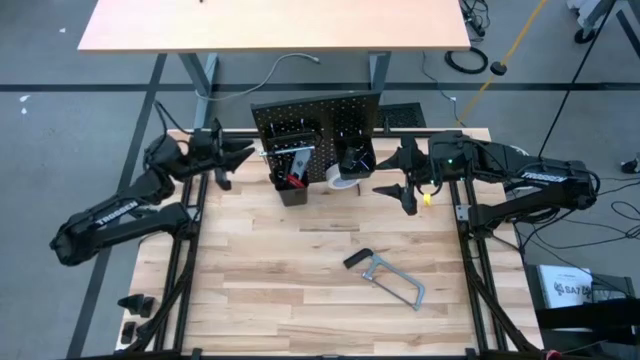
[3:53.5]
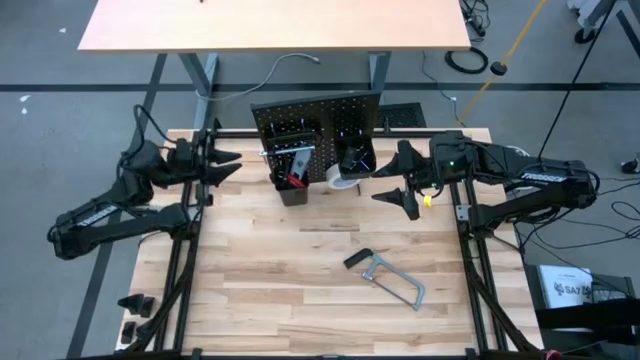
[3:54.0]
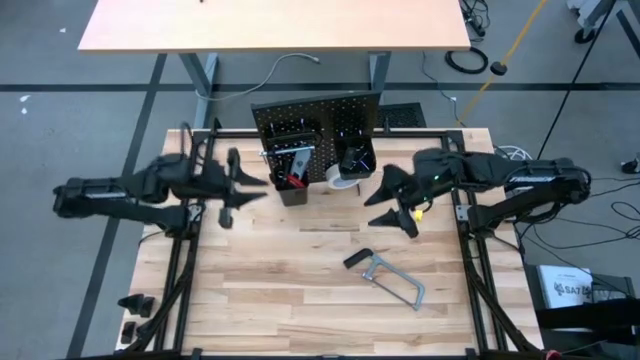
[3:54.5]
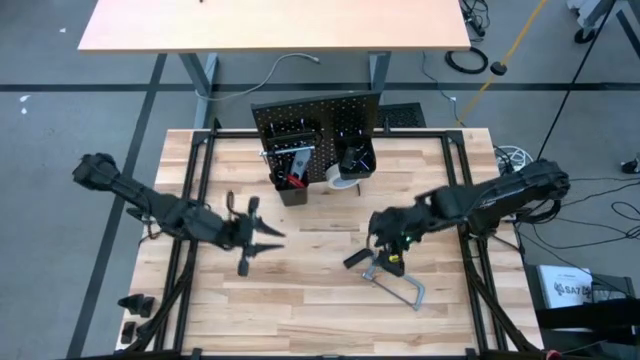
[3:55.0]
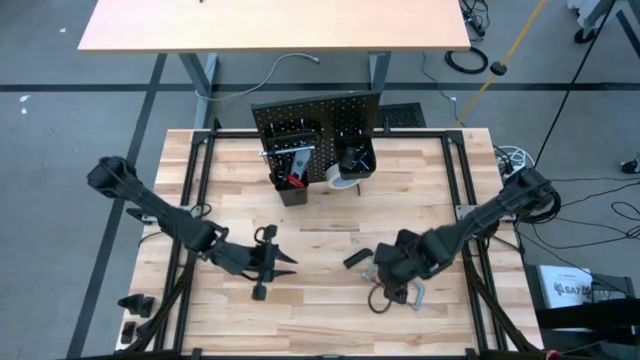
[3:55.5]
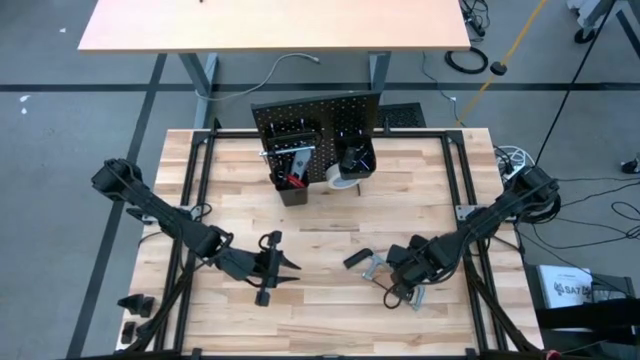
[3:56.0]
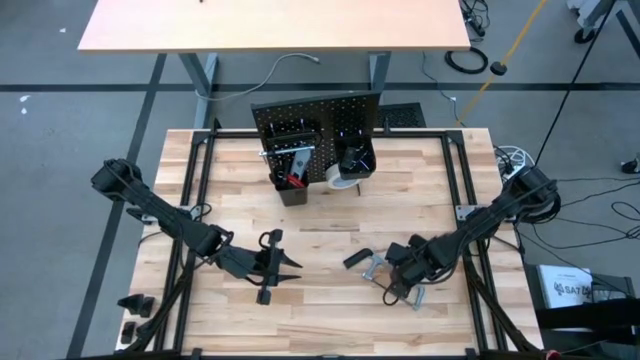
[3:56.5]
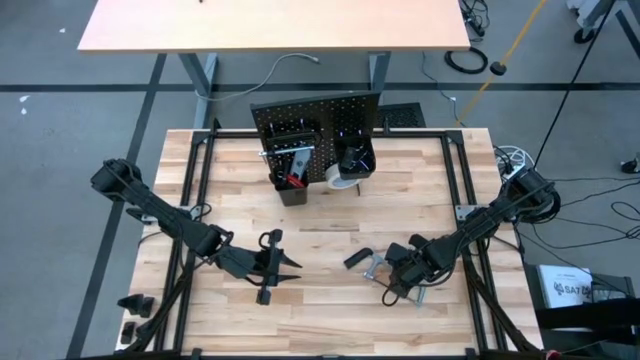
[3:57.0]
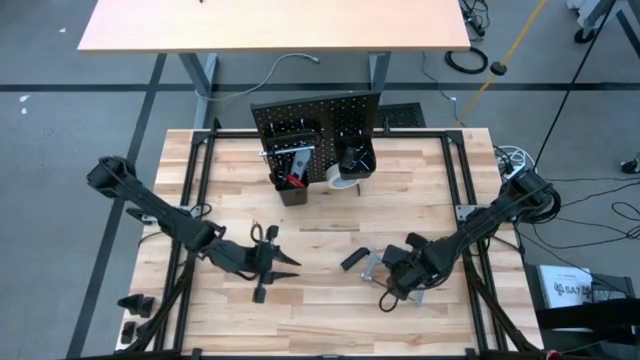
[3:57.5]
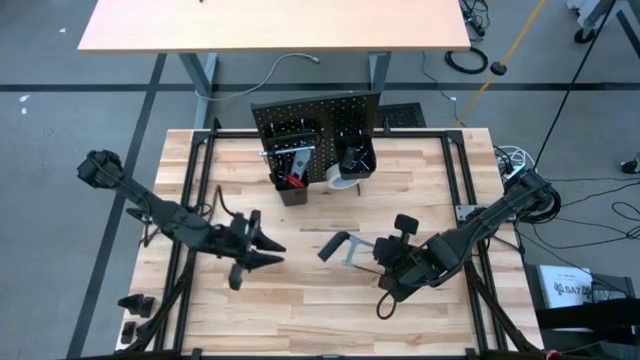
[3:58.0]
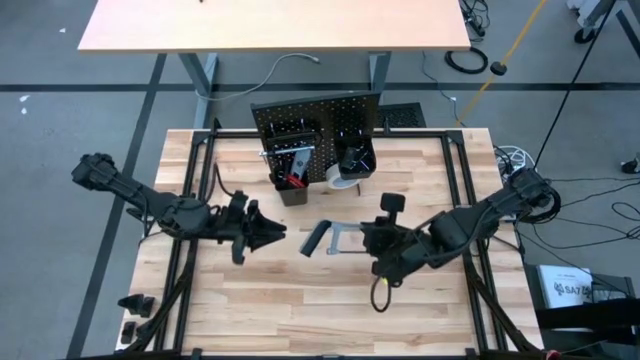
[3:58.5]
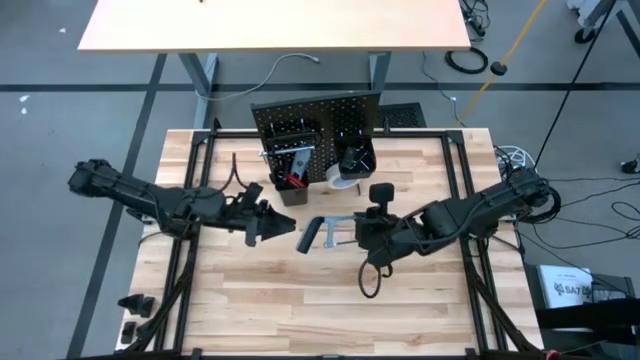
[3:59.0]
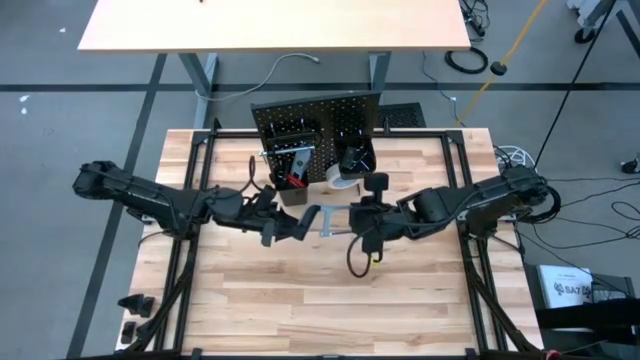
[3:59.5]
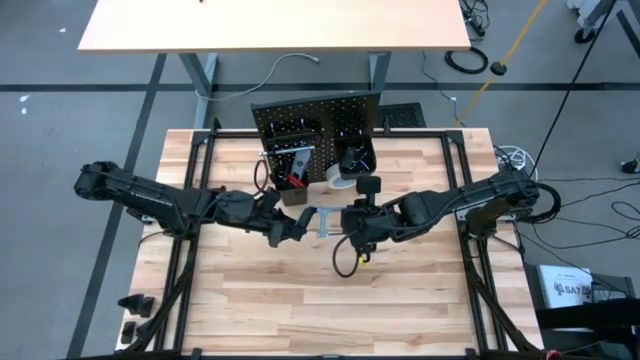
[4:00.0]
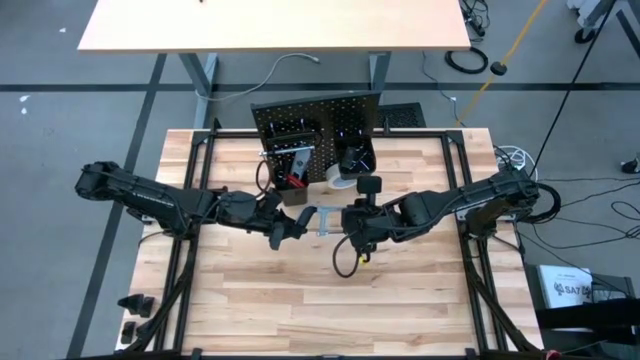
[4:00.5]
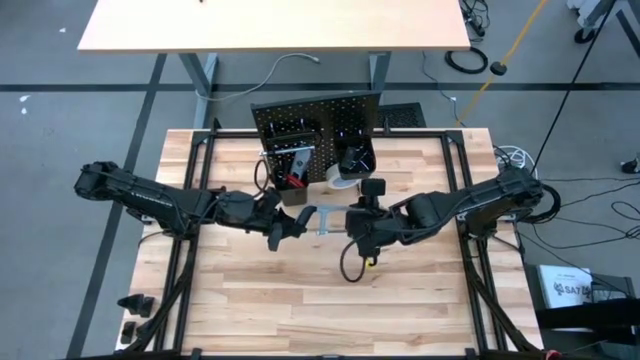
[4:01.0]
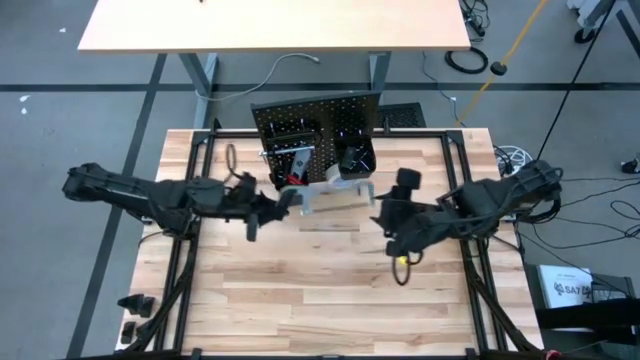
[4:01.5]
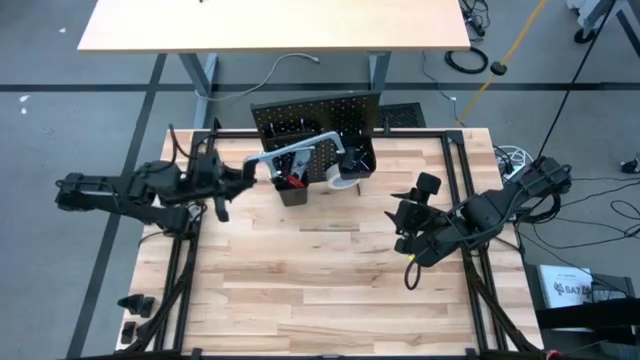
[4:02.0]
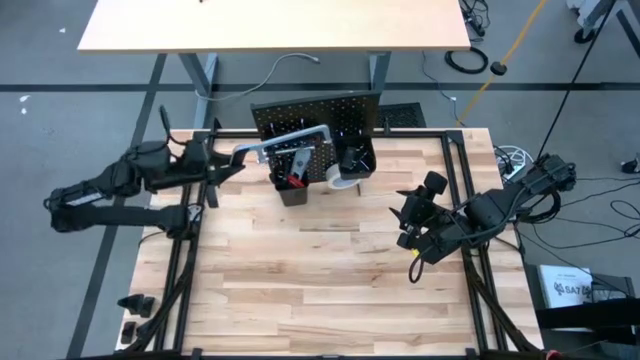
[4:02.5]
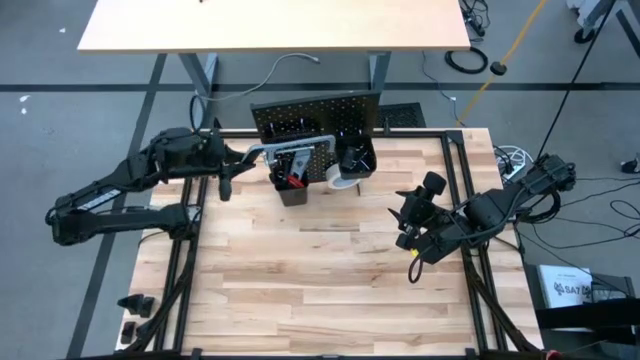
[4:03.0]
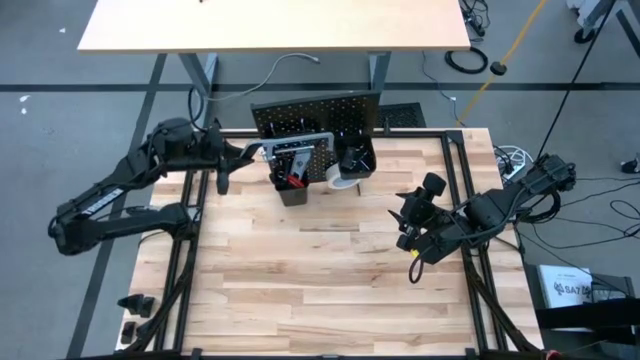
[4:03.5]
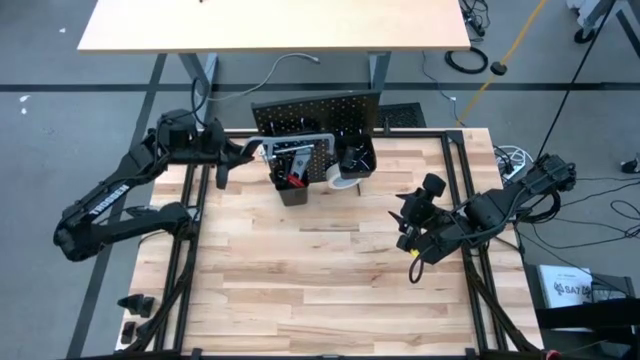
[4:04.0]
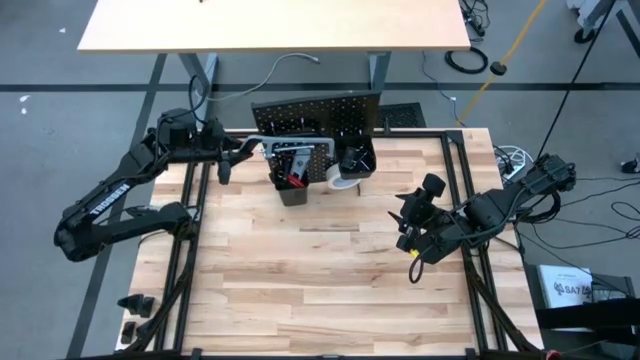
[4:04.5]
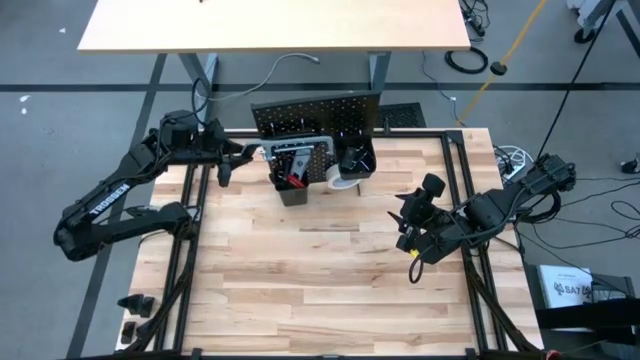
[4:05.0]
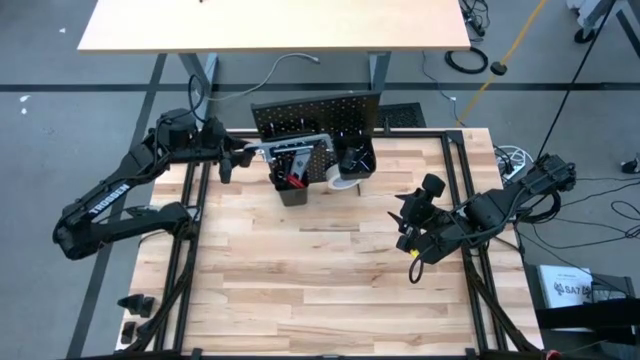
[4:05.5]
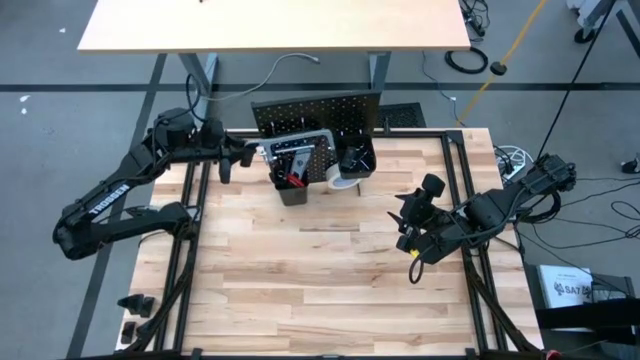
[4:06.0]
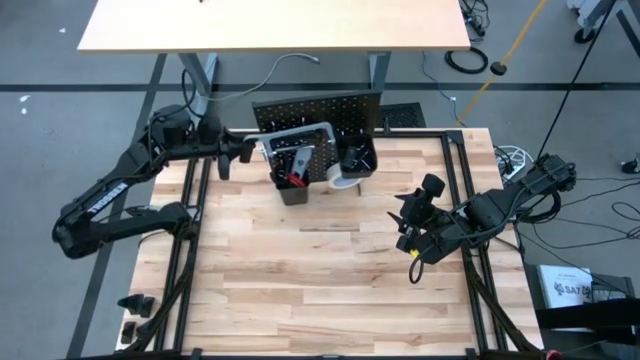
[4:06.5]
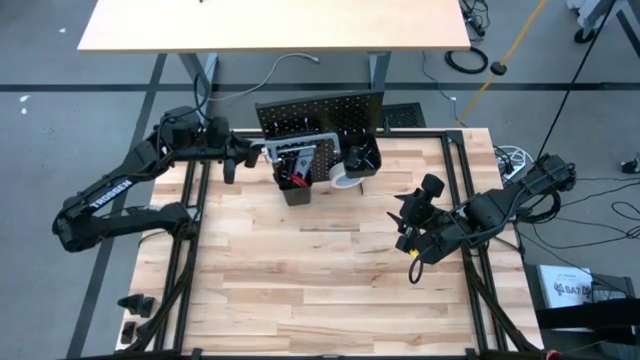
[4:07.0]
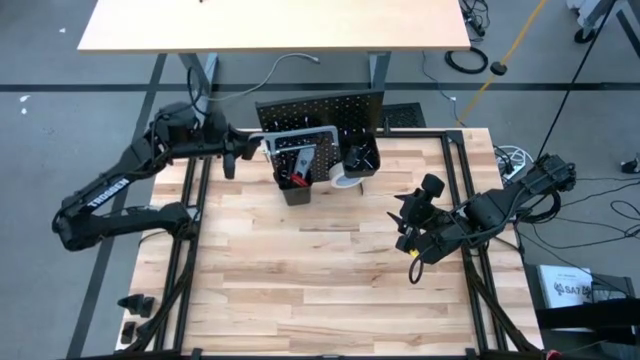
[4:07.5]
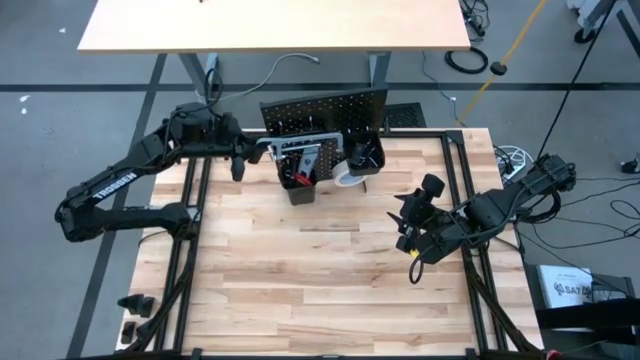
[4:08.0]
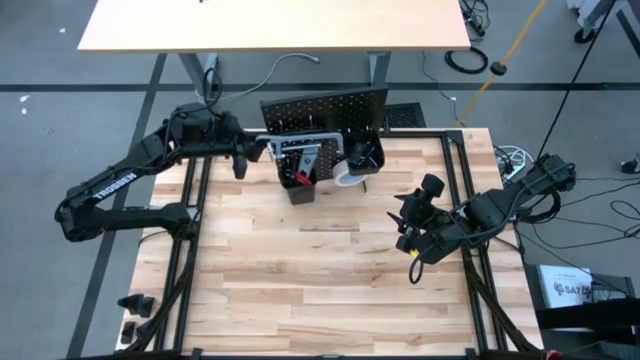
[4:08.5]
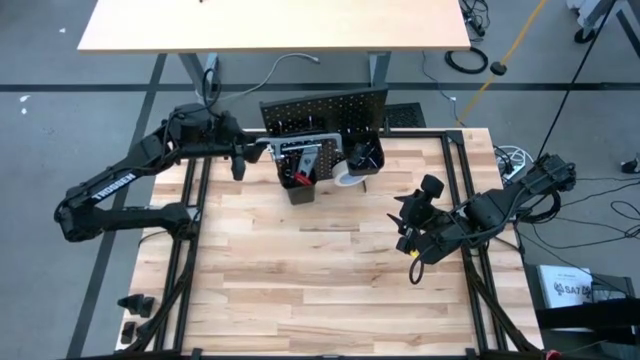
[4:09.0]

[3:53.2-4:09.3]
Task: Hang tools onto peg board
Hang the hacksaw on the pegboard

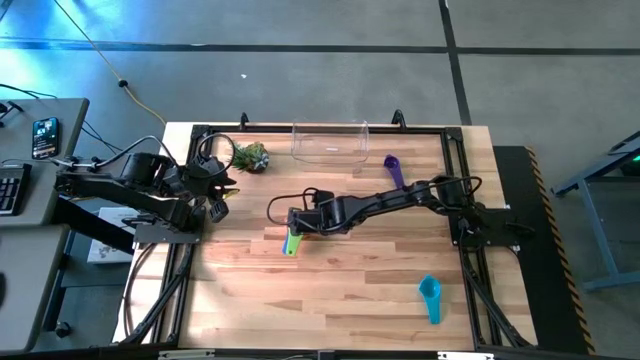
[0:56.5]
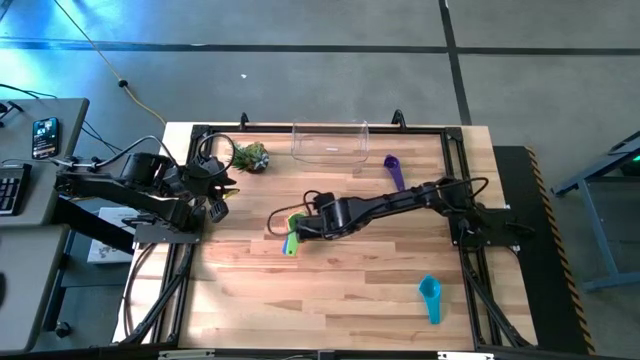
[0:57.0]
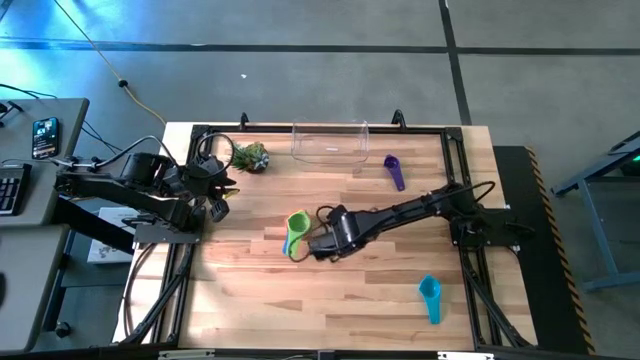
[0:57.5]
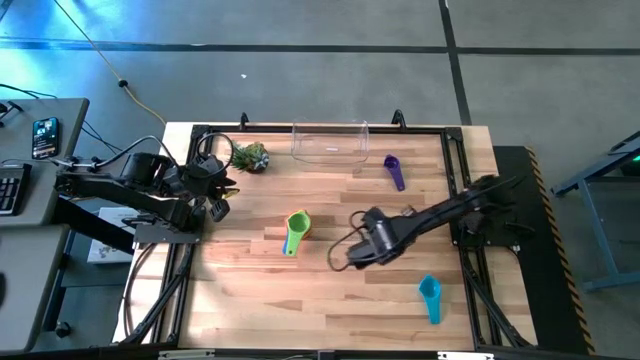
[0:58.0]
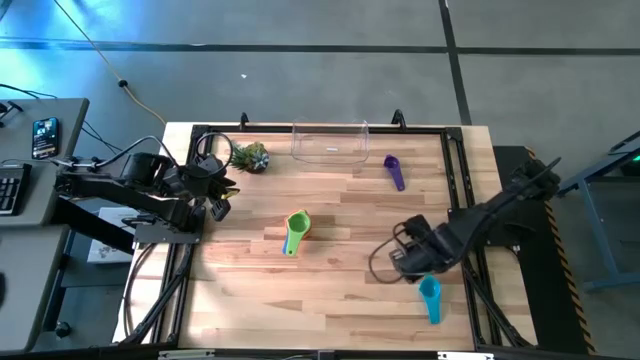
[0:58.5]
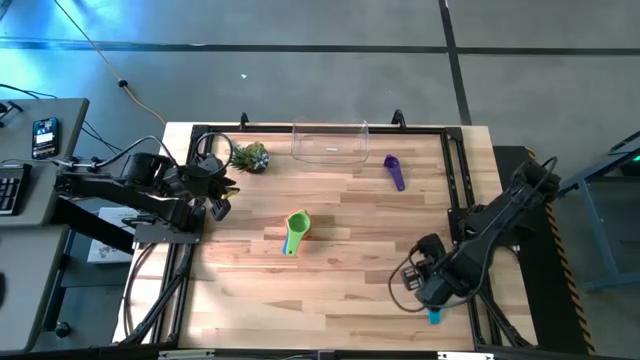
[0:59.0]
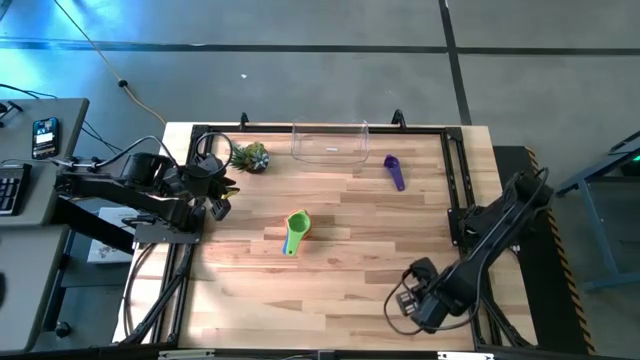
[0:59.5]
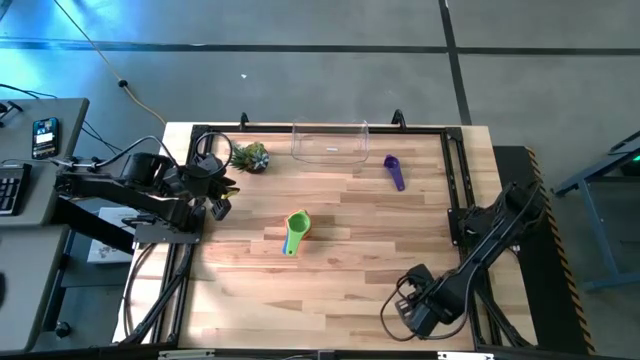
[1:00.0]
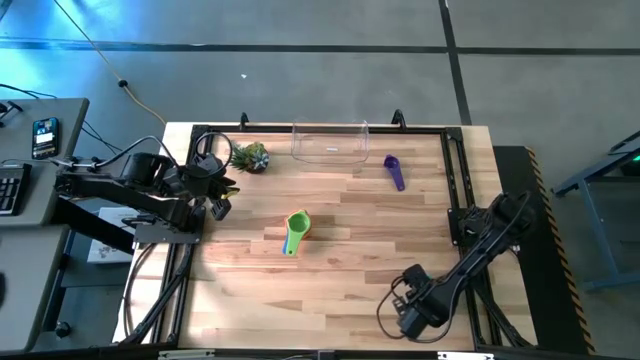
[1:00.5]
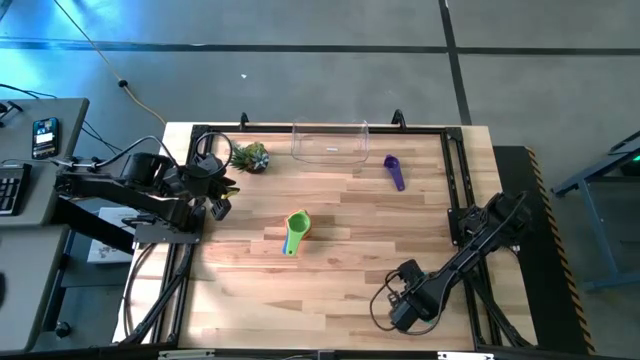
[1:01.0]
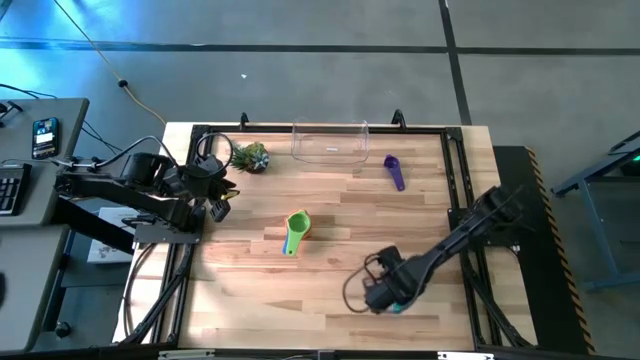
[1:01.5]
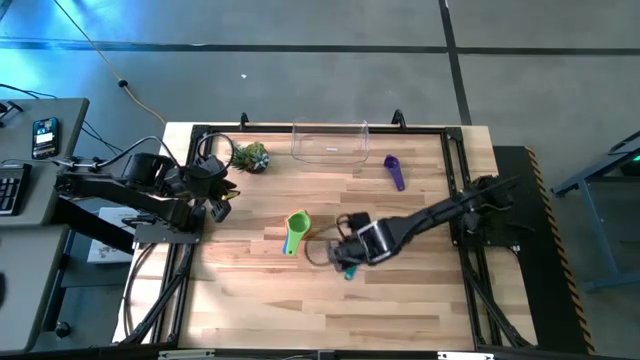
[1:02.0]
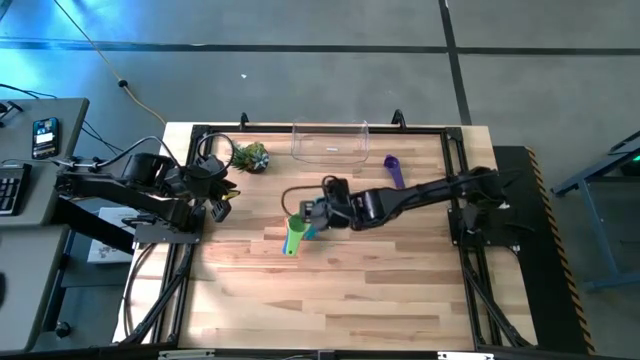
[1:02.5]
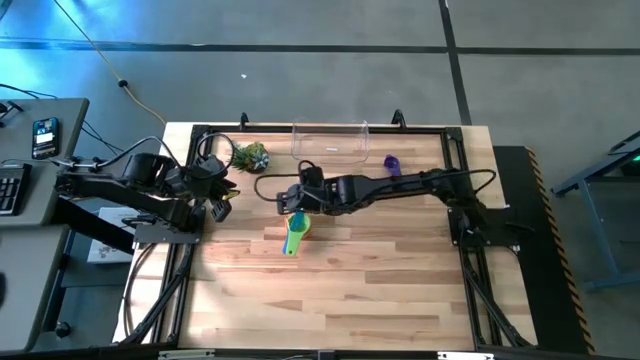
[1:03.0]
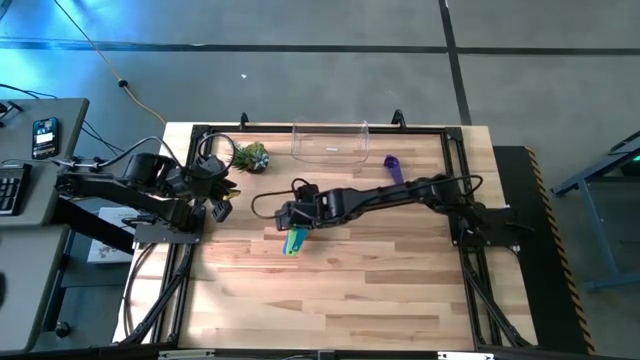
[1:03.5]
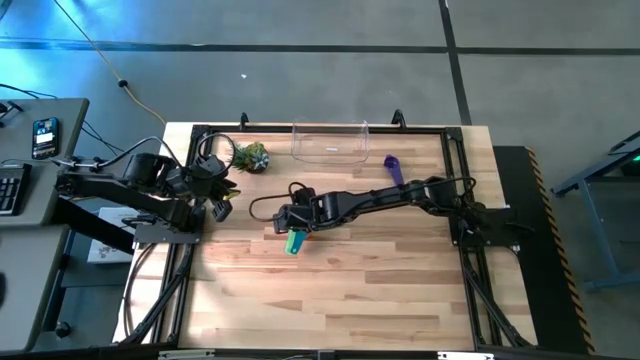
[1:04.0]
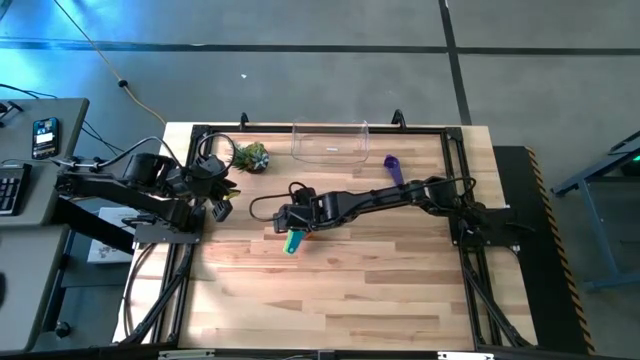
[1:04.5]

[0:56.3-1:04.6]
Task: Nest measuring cups in basket
Stack the light blue measuring cup on top of the green measuring cup
